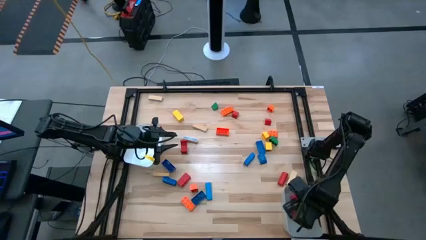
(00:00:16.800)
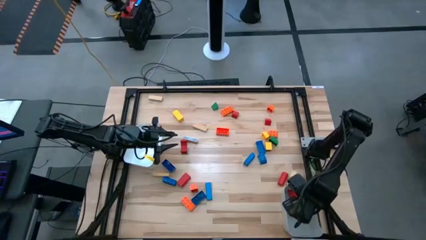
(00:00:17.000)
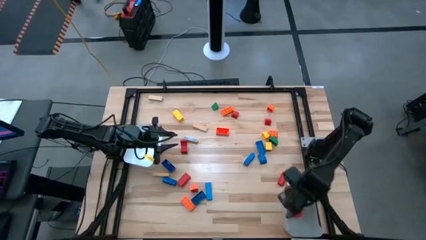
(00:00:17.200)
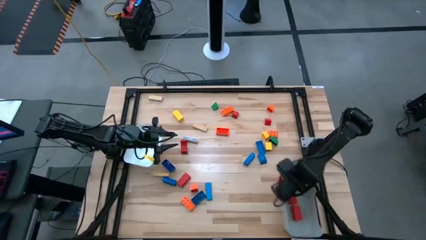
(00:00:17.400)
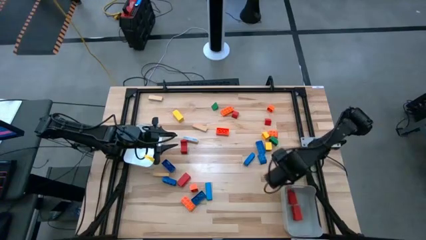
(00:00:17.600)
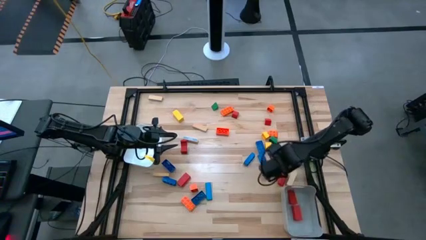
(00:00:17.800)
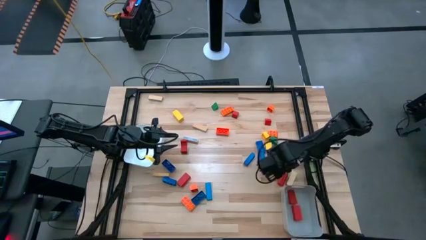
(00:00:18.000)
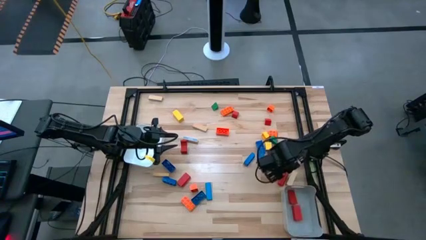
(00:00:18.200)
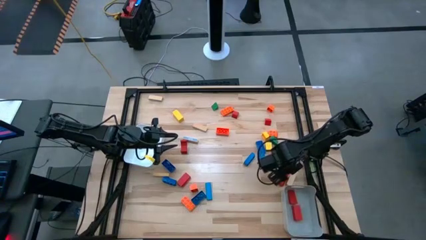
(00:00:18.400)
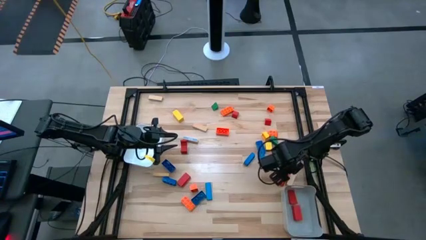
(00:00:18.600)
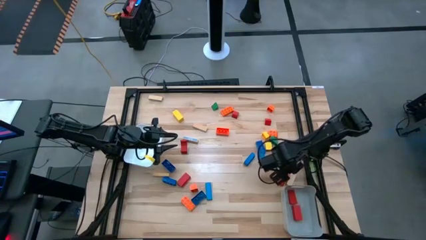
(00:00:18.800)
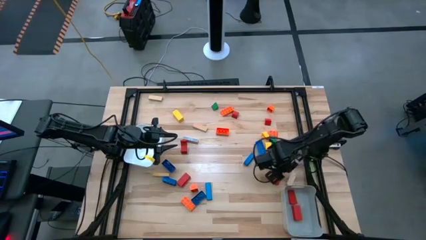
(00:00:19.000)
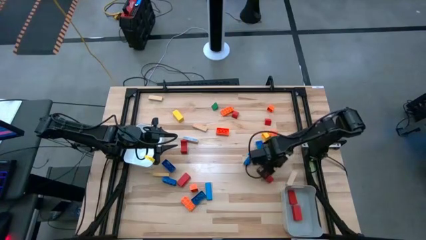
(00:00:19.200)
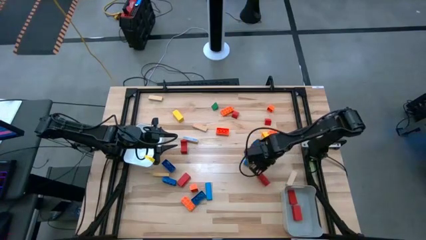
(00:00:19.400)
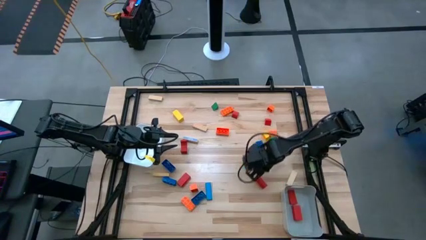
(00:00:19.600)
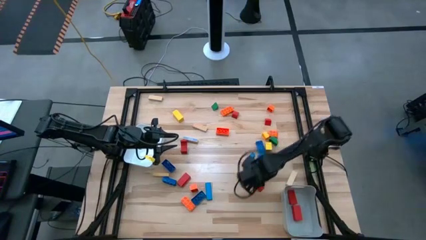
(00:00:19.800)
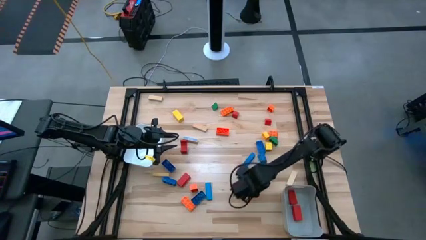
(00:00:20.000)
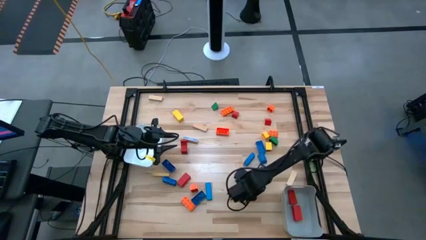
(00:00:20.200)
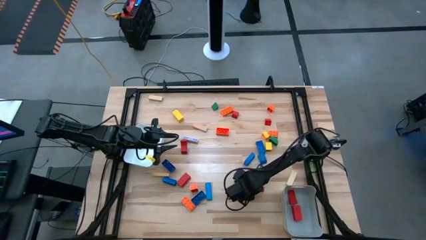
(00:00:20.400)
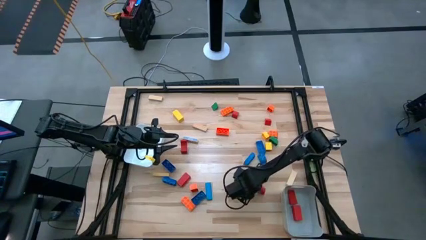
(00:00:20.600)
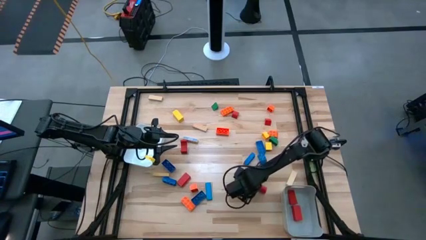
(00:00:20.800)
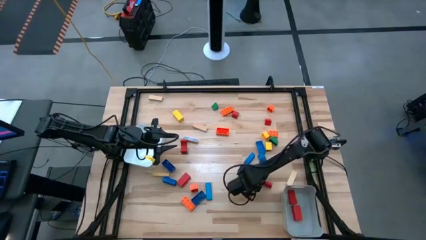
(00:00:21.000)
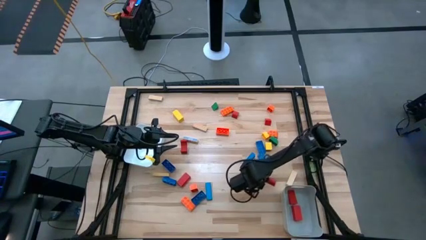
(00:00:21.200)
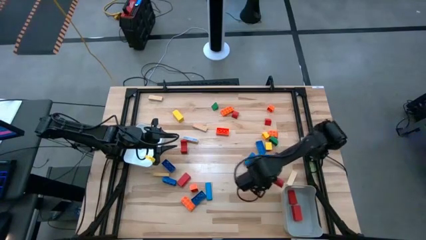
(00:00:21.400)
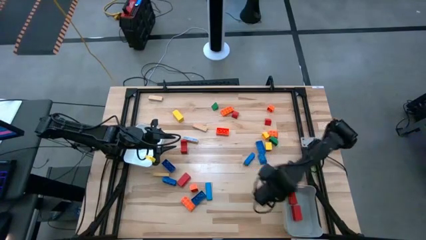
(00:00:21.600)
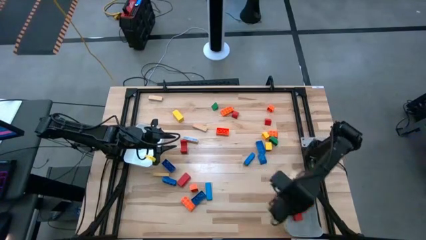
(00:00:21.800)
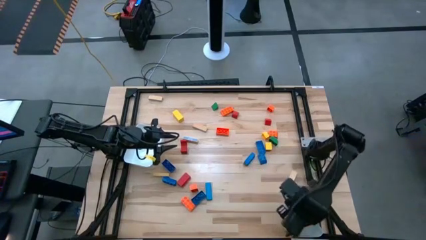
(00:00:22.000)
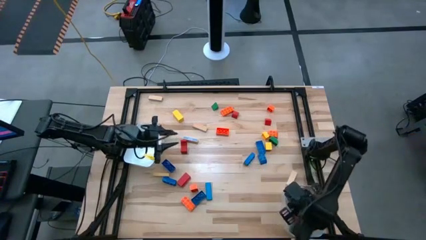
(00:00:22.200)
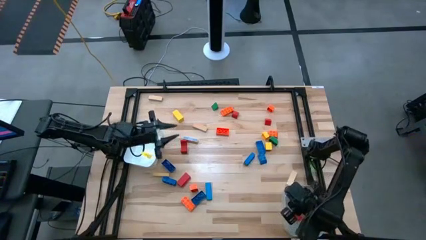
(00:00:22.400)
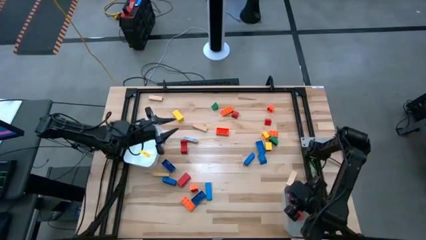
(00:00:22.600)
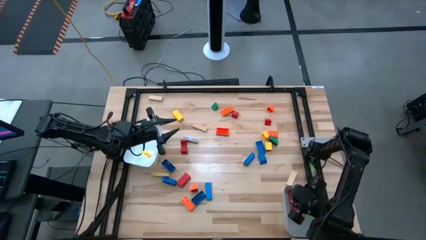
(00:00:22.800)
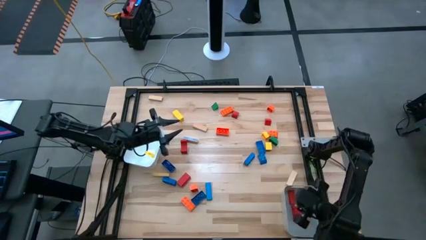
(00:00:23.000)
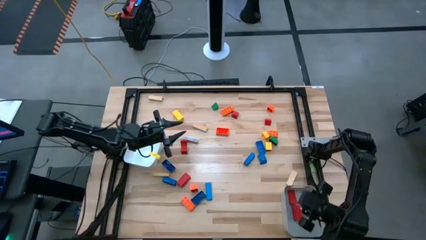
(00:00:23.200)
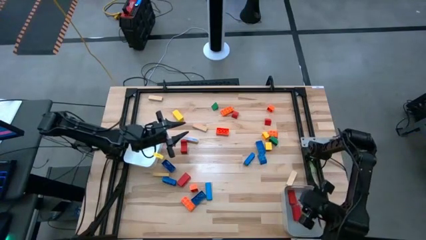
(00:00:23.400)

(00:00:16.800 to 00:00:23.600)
Task: Sort blocks by size
Put the red large block into the gray bin

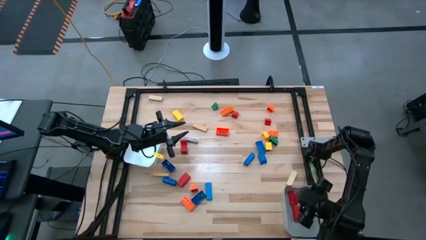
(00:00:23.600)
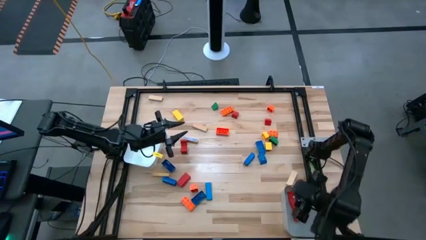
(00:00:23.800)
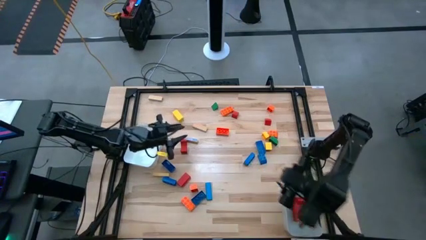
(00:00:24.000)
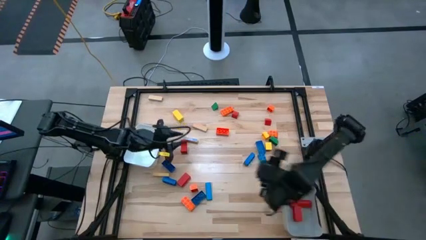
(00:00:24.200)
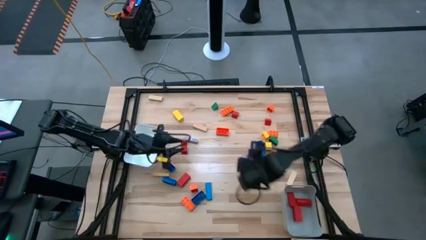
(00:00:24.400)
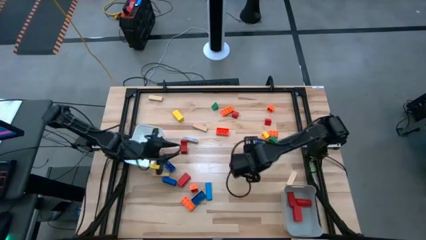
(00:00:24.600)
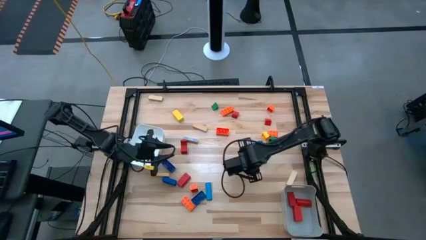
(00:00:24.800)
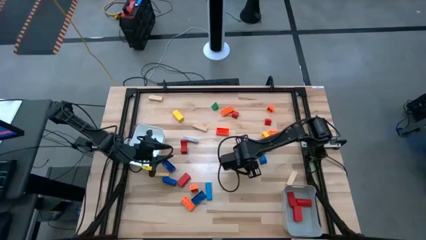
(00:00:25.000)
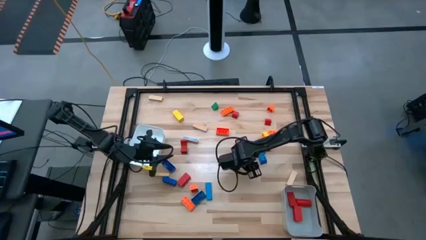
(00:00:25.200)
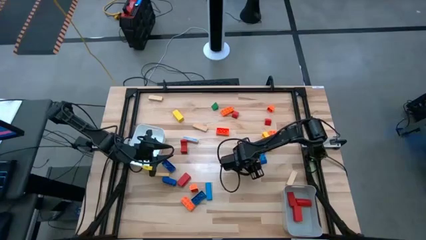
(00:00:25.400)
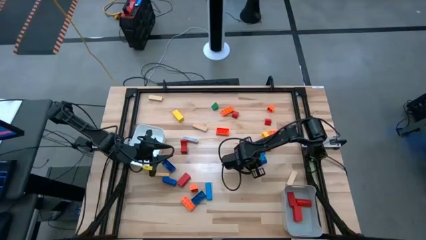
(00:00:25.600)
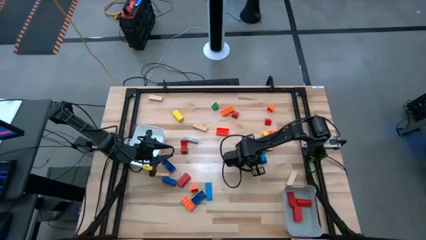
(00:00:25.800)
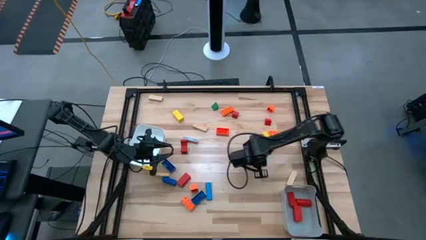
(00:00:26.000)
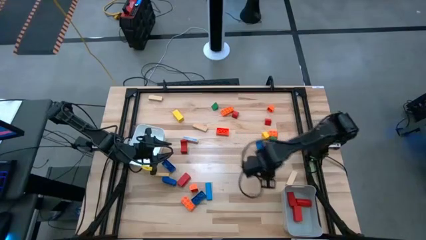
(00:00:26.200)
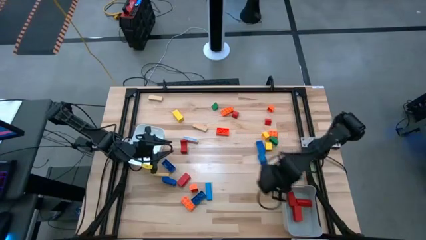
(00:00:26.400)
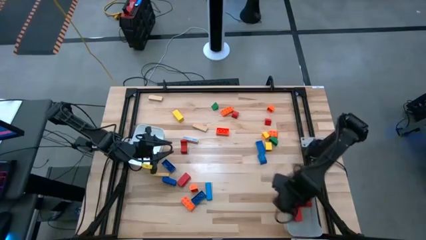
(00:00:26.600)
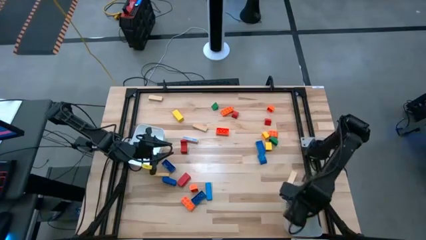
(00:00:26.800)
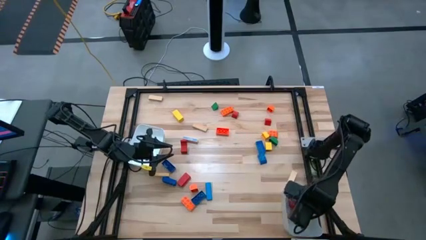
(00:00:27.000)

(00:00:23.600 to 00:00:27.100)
Put the blue large game piece into the gray bin

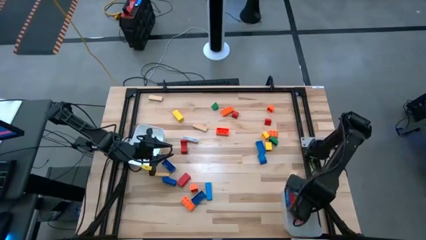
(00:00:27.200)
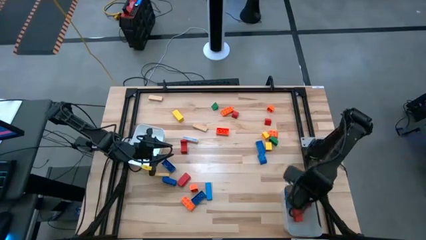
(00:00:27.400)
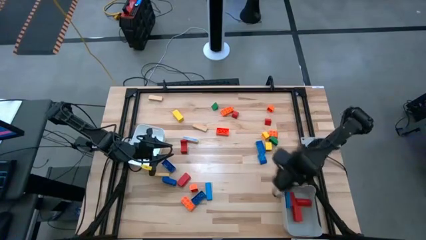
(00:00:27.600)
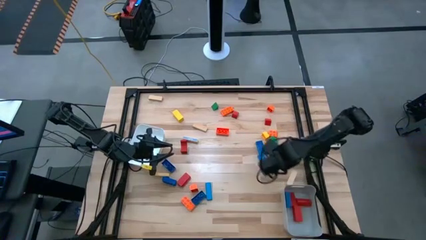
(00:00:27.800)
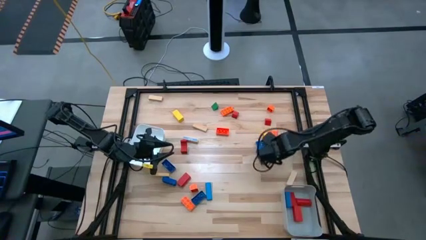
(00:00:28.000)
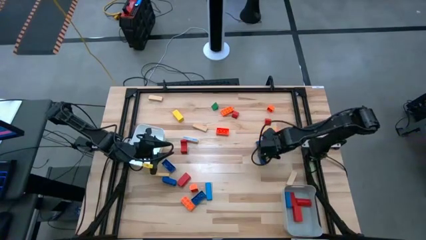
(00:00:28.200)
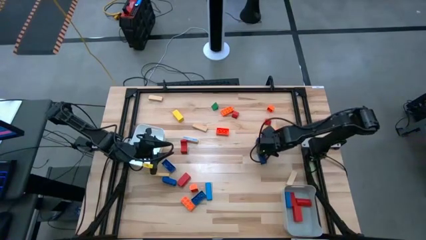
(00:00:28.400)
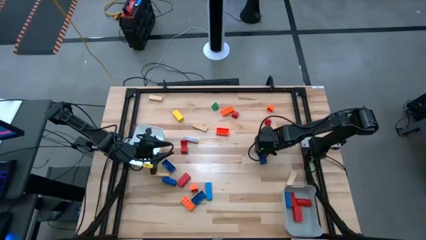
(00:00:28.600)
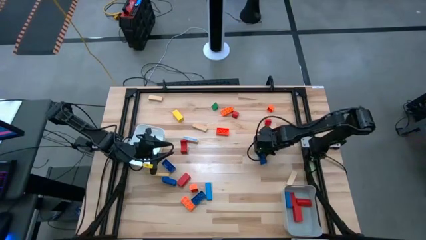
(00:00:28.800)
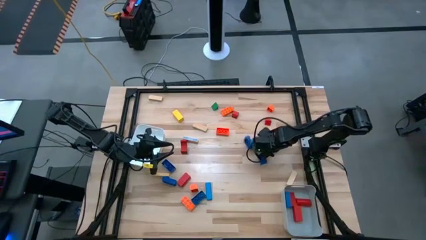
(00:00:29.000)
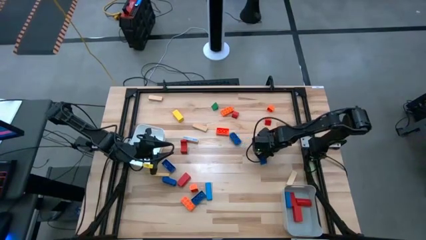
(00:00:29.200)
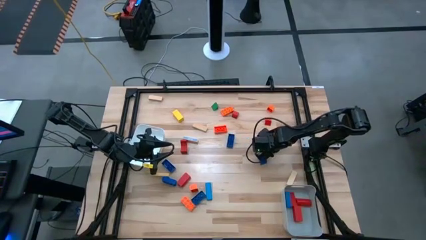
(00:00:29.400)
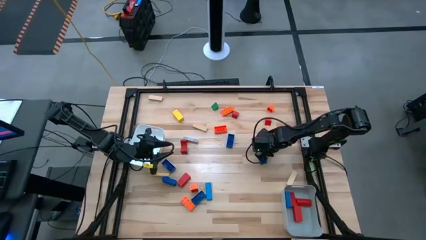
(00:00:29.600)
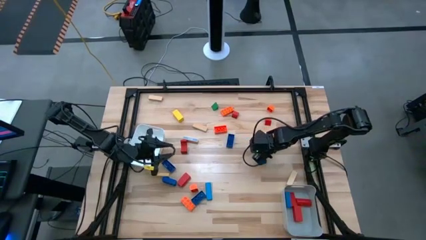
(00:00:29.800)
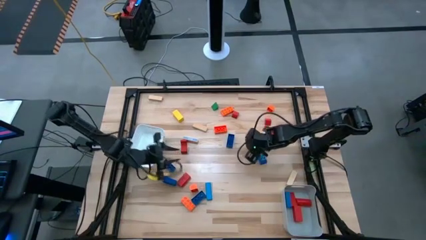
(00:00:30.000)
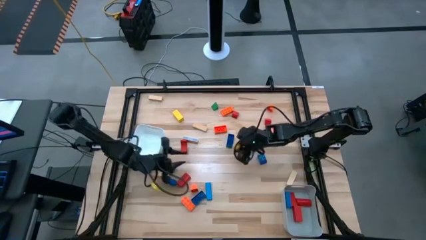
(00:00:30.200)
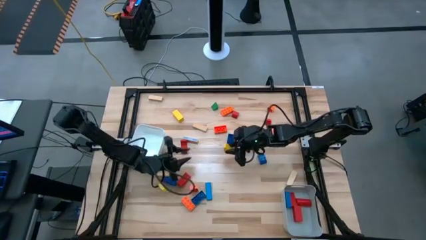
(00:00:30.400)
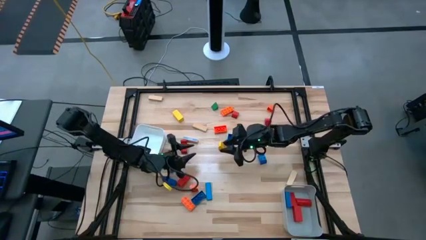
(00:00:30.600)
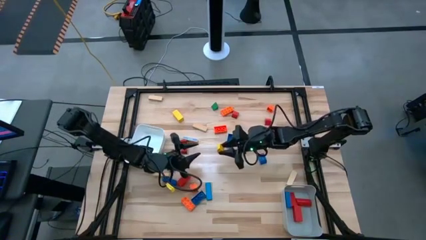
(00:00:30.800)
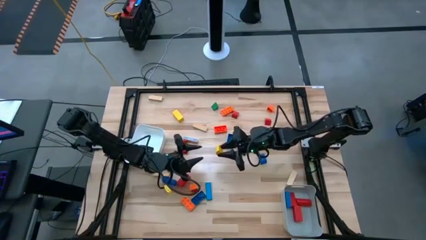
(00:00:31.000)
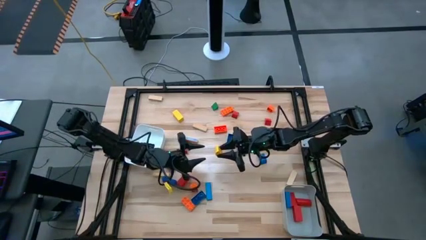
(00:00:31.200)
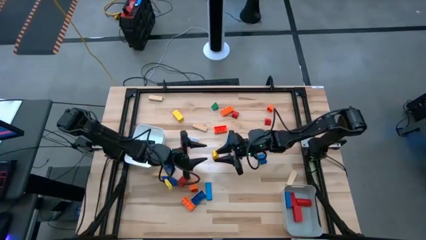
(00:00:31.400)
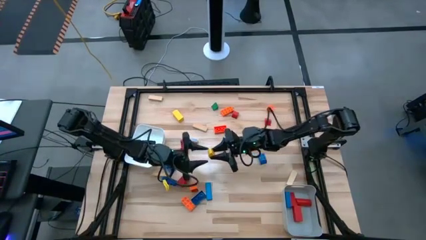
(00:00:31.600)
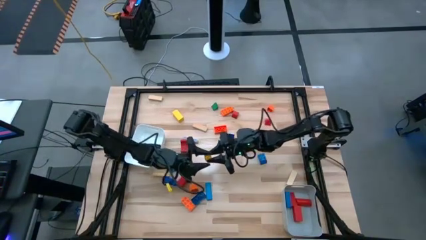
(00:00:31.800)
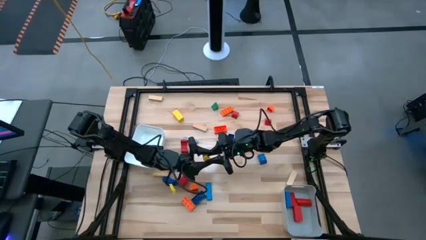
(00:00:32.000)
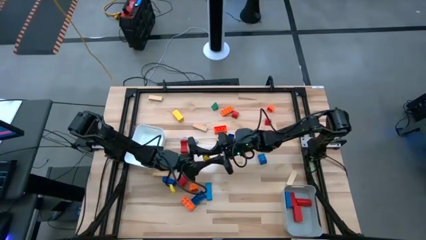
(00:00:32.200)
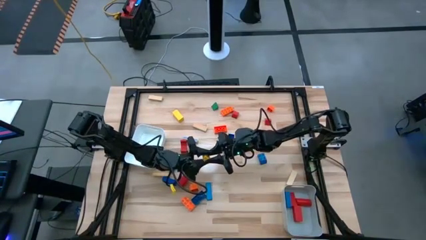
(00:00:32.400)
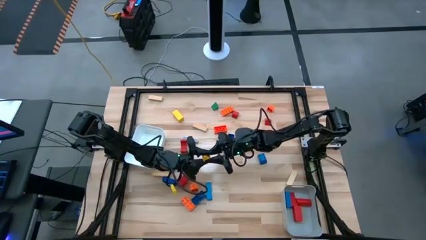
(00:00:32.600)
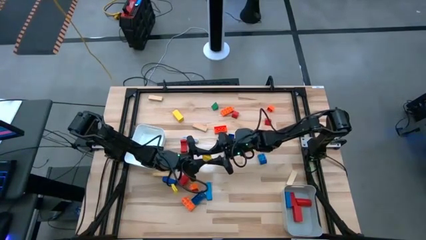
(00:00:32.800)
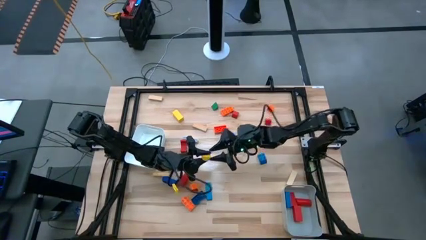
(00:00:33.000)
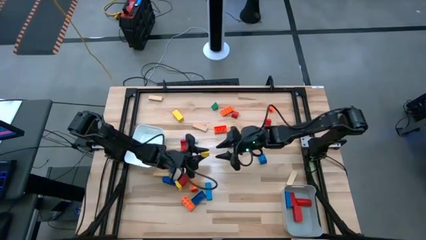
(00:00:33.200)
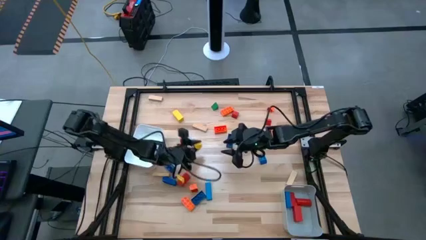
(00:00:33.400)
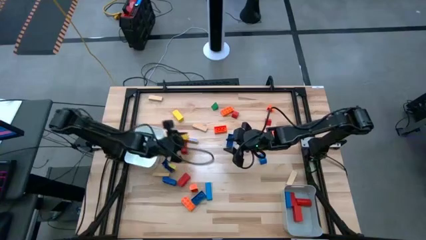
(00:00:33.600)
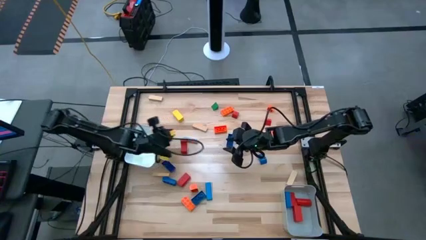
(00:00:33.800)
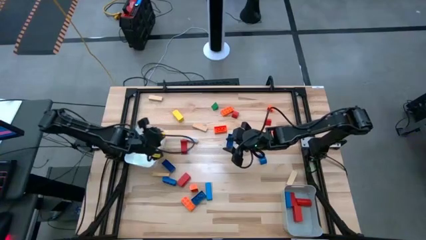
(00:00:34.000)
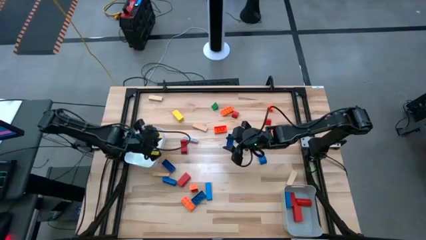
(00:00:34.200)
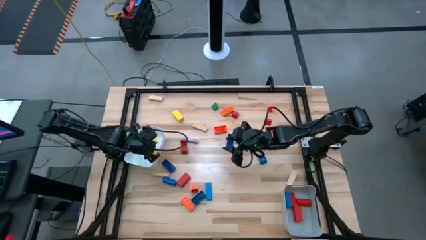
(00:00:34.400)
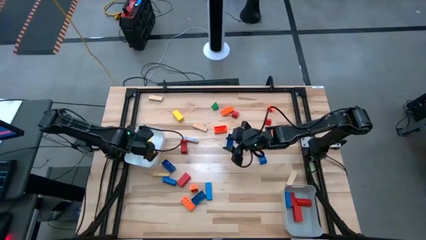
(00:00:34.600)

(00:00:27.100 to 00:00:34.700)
Put the yellow small block into the white bin
